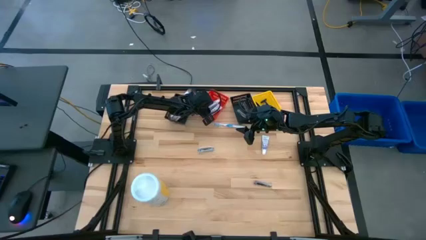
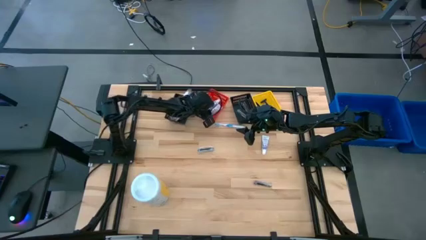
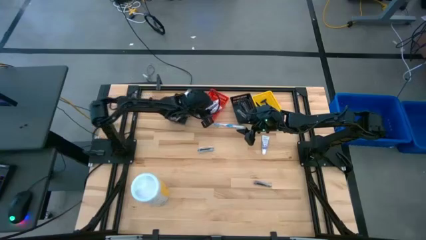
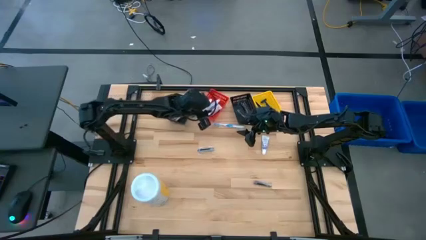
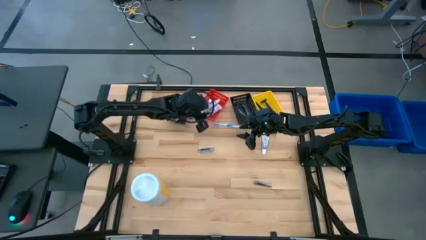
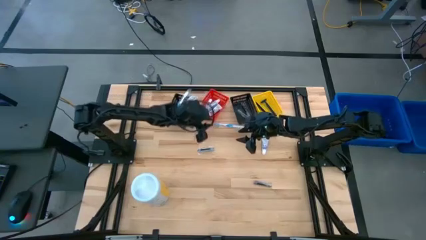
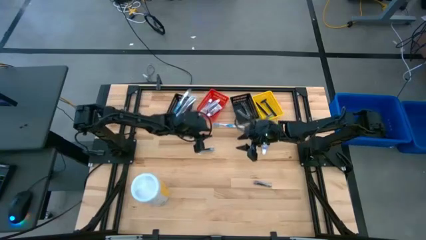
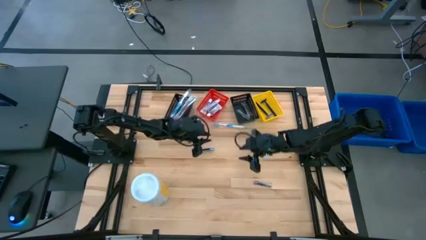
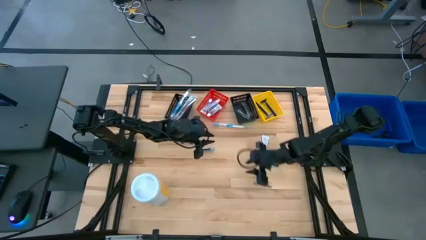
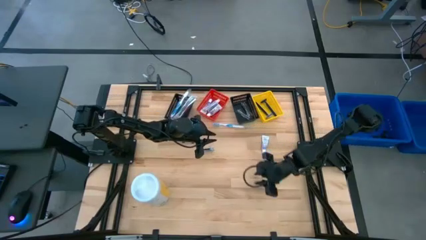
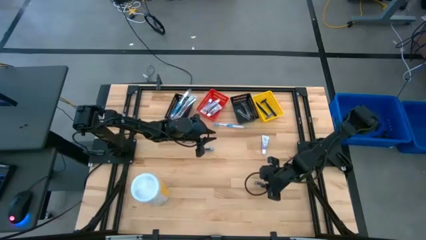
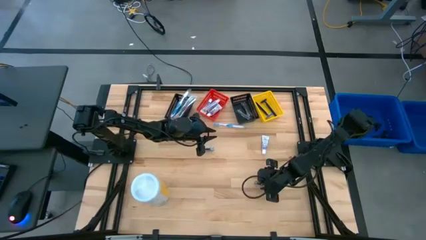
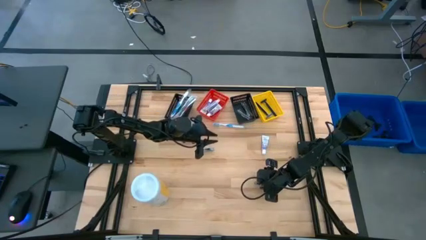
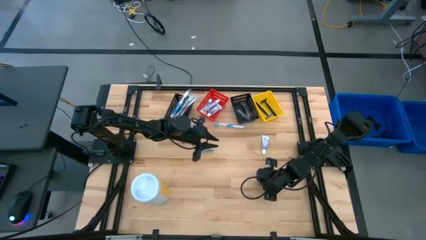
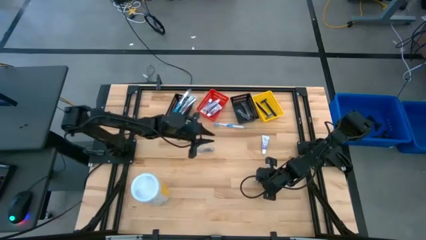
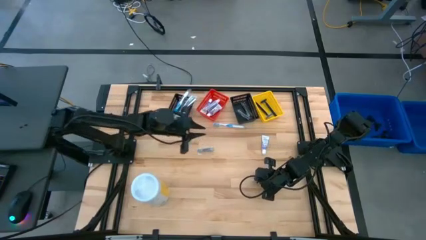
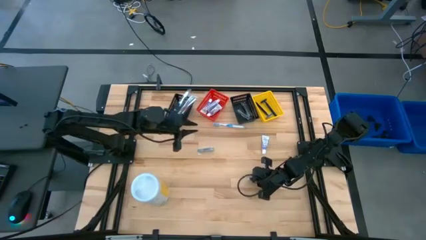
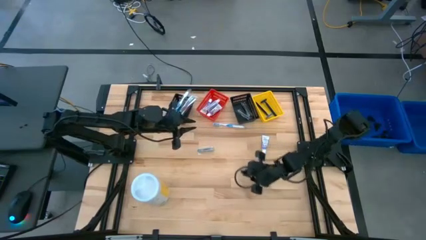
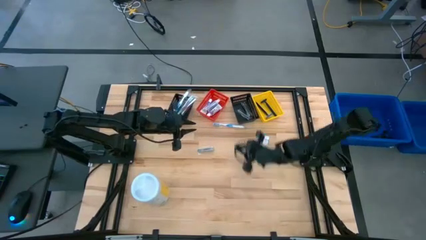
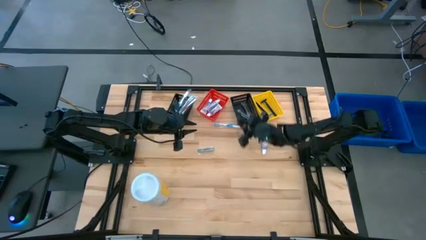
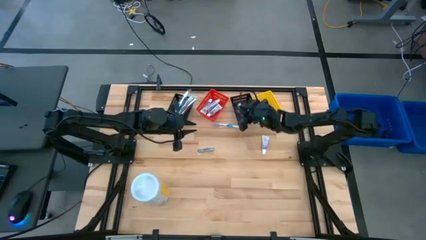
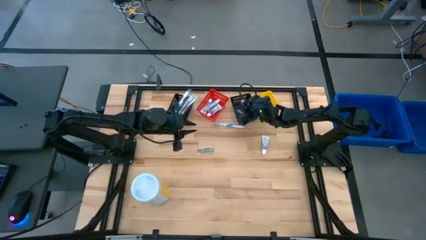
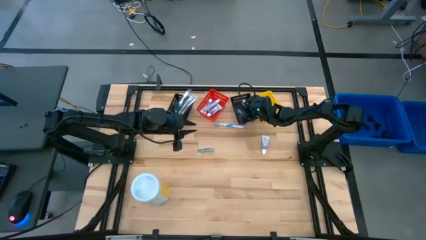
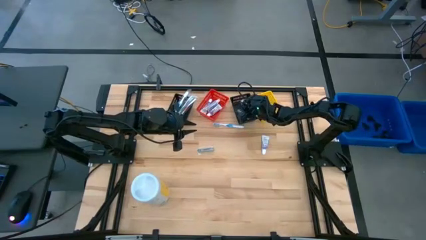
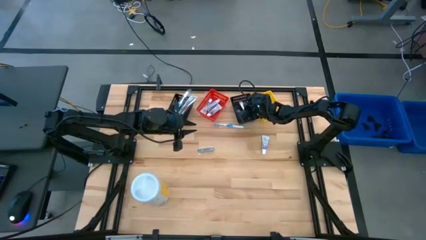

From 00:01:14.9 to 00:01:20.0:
Task: Pick & Place Travel size toiletries
Put the nail cutter into the right black bin

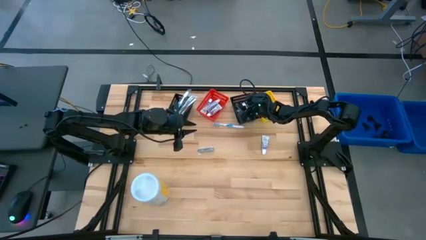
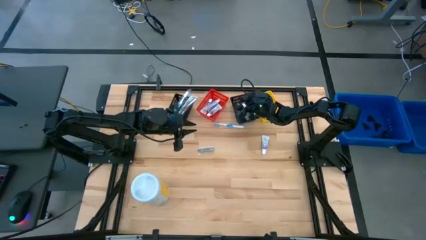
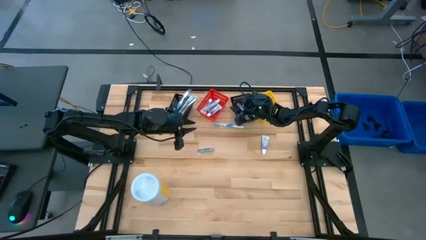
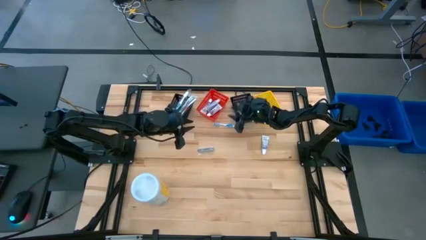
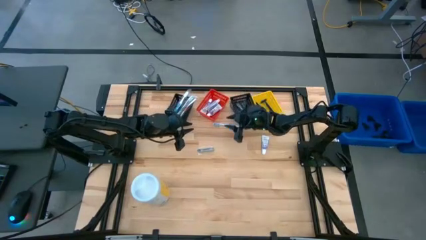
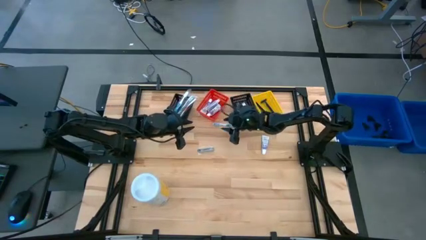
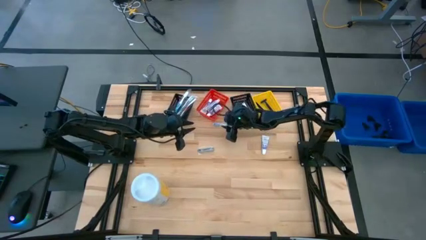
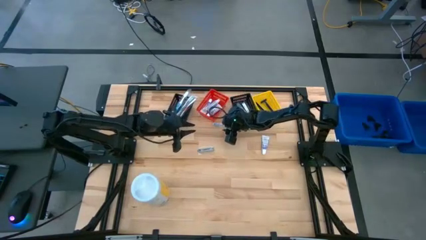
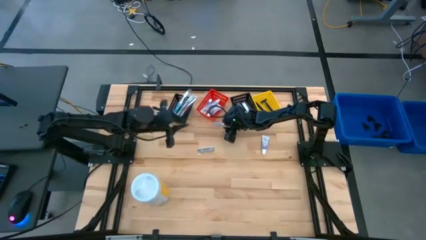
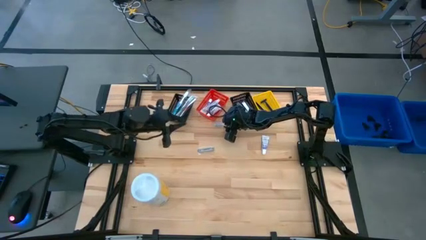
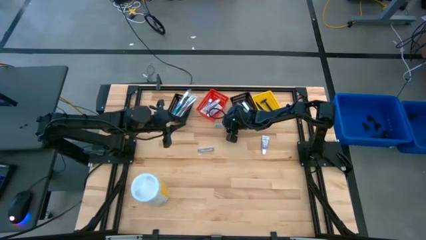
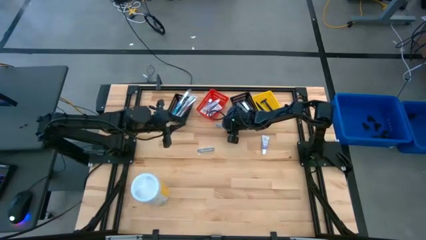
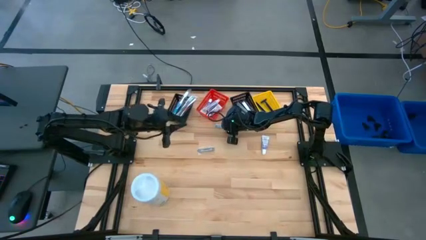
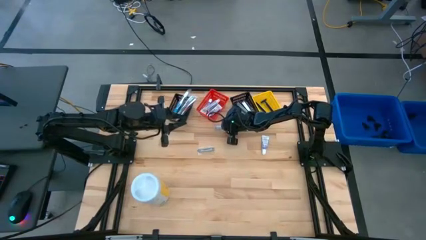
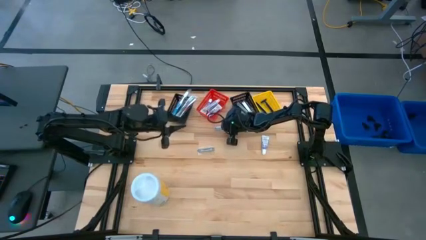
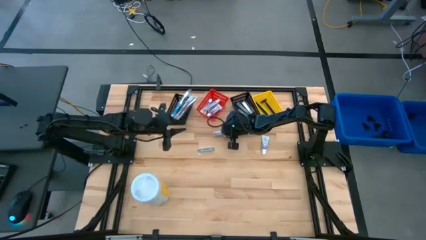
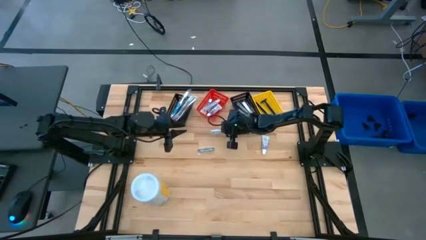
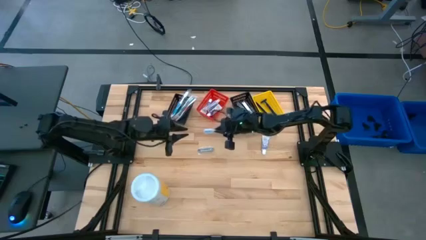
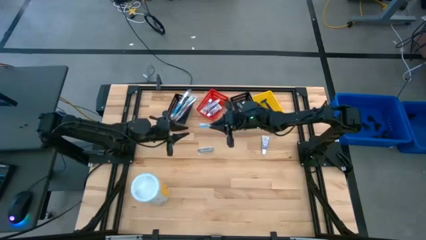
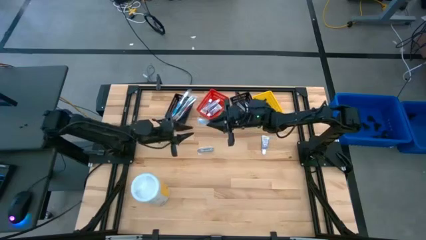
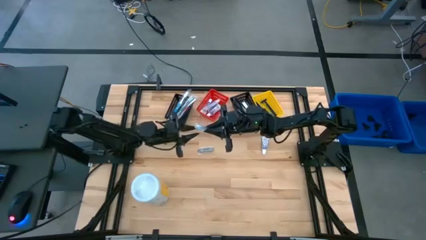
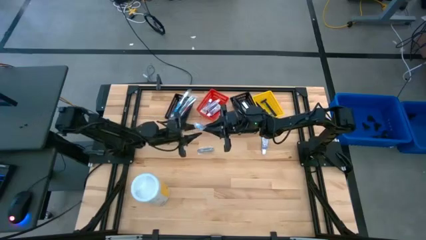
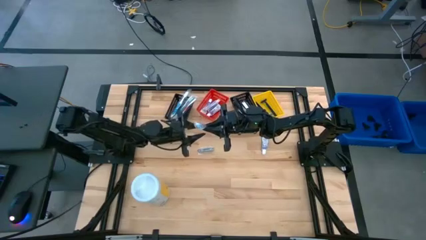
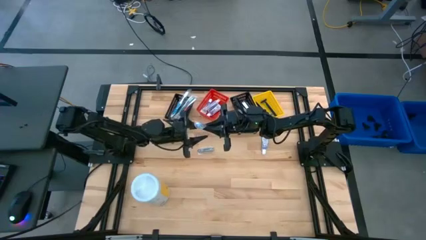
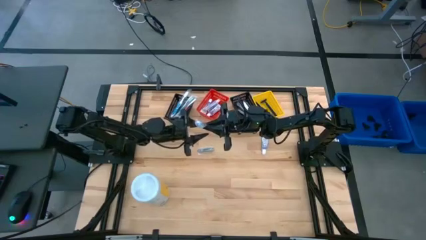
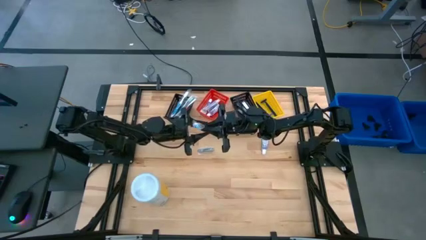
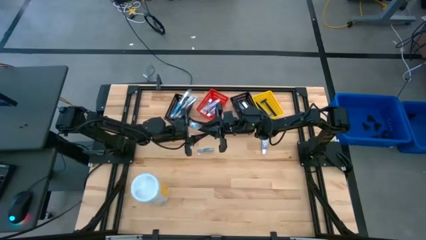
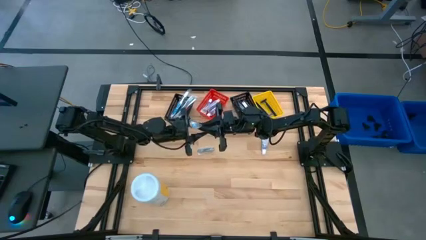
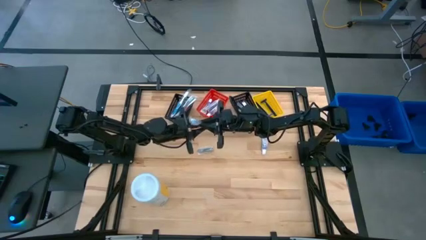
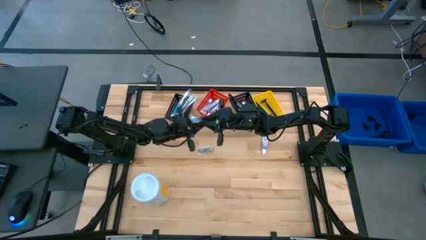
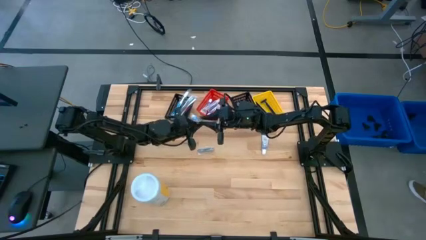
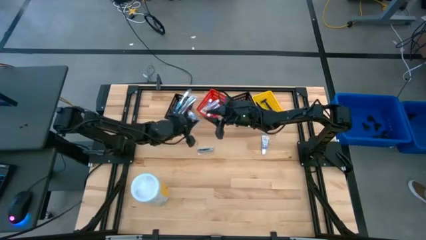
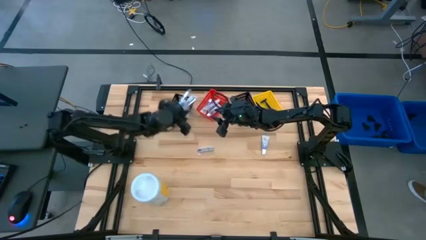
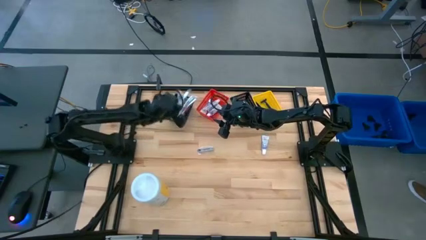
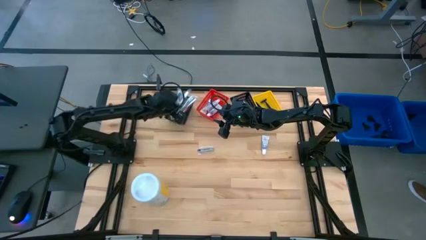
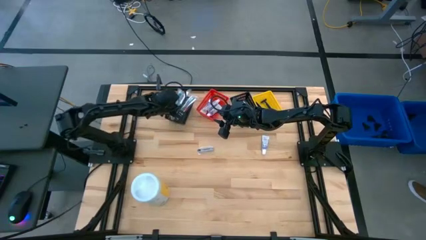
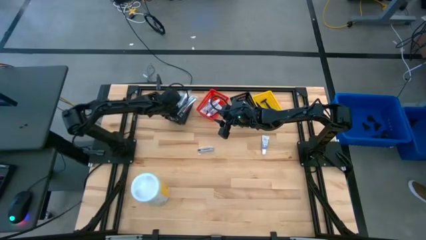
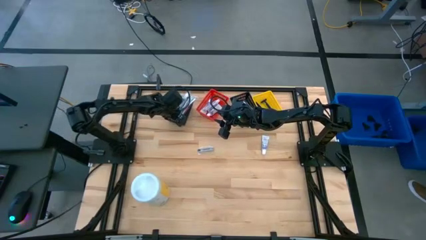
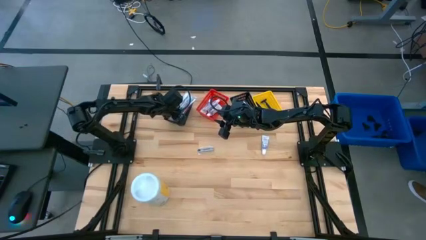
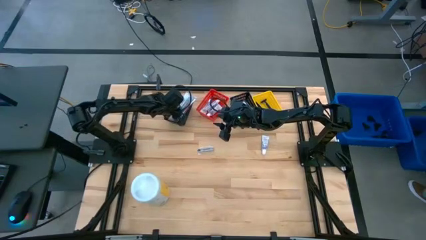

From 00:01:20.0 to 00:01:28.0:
Put the blue toothbrush into the left black bin

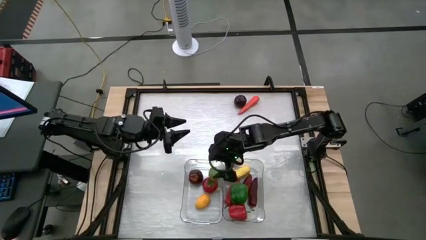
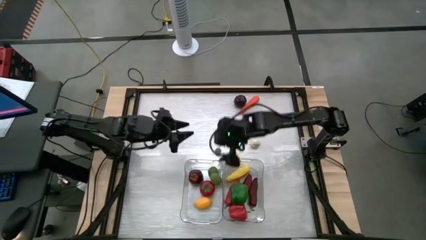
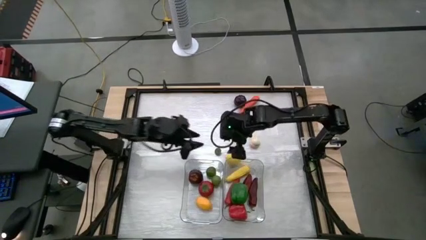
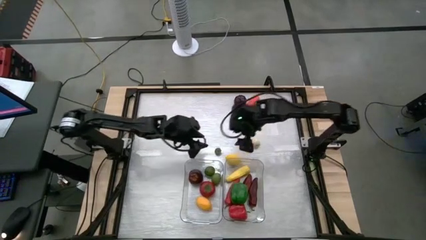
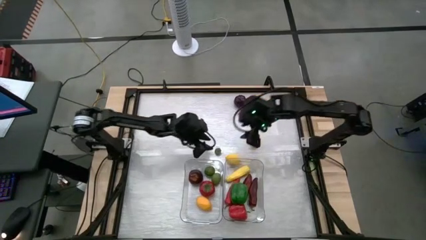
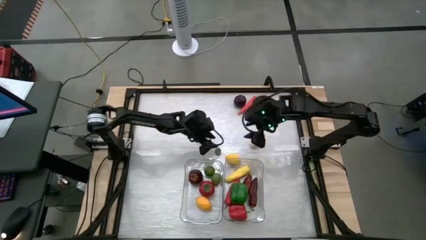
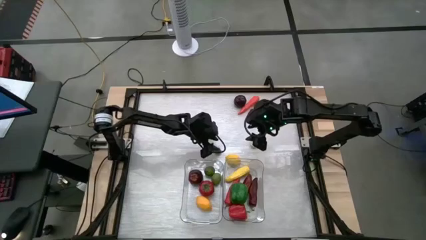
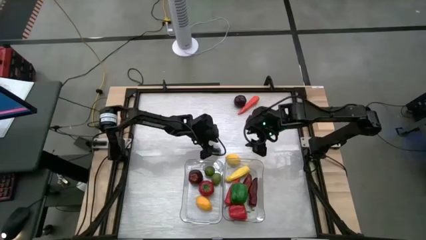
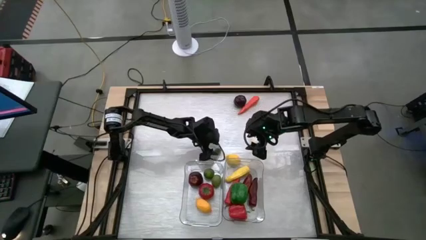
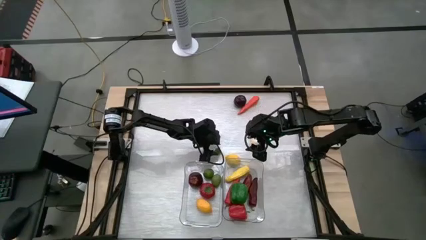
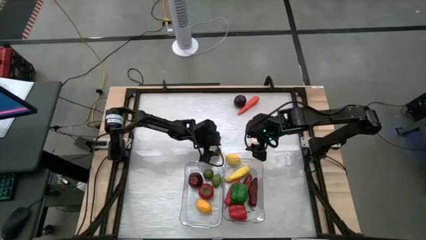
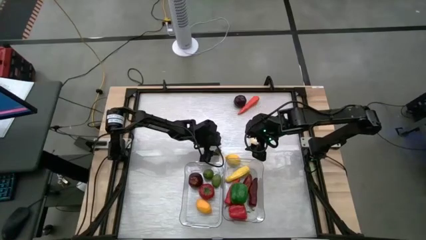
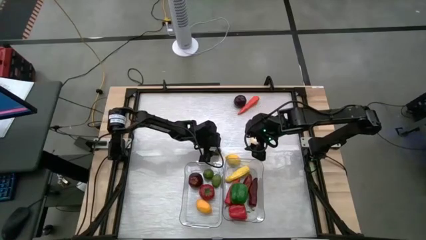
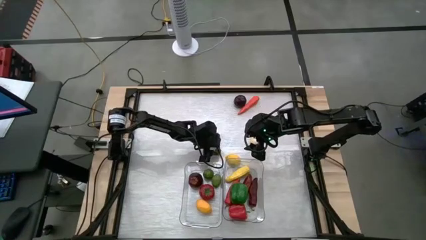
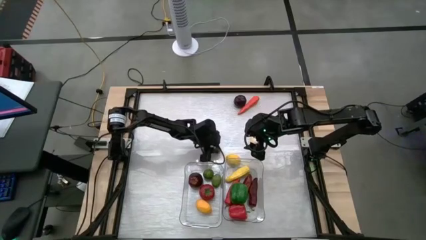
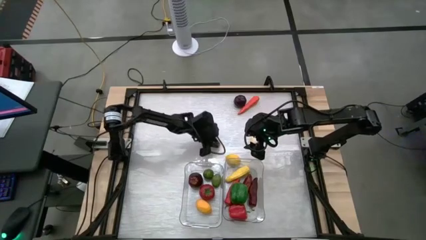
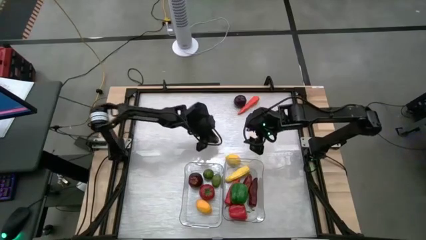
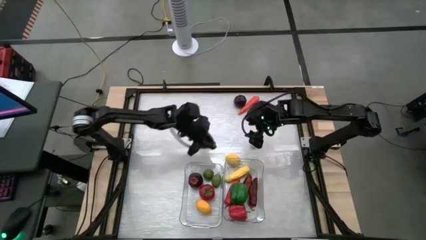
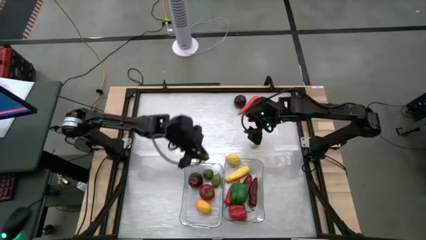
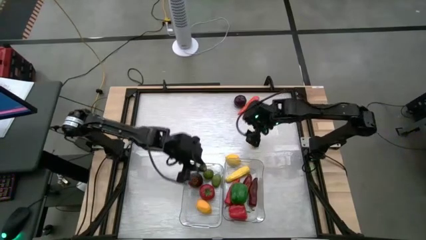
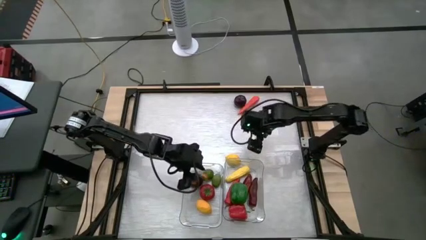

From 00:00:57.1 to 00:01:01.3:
Task: Sort produce into baskets
Put the small tomato into the left transparent bin
